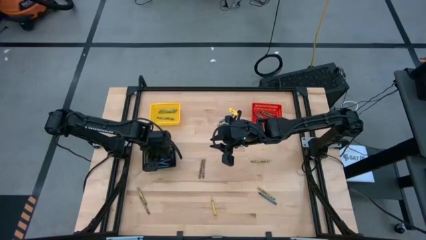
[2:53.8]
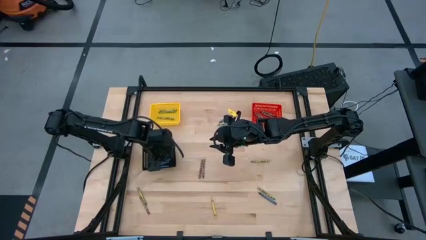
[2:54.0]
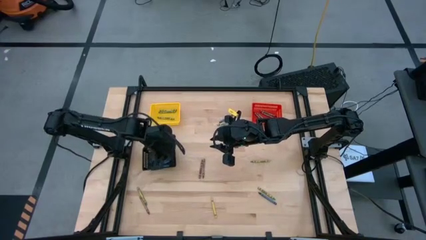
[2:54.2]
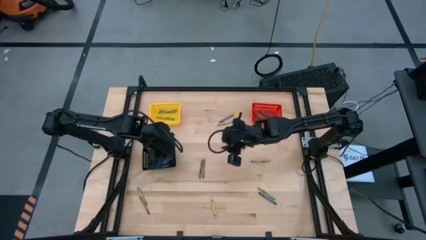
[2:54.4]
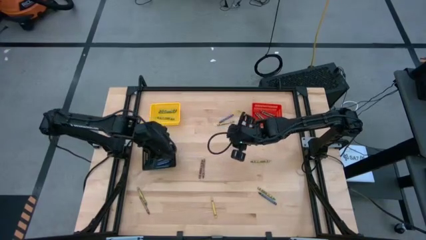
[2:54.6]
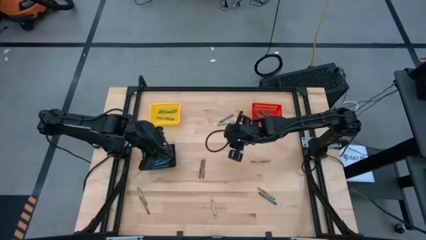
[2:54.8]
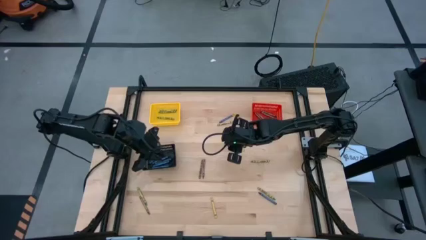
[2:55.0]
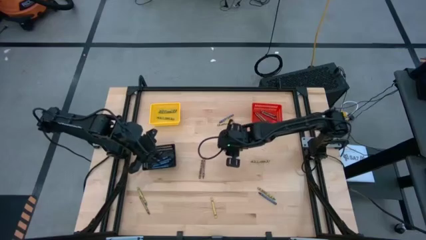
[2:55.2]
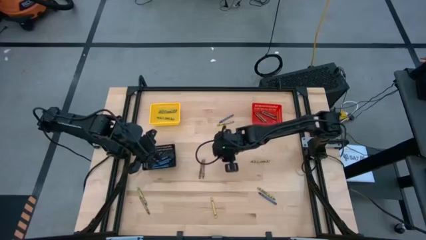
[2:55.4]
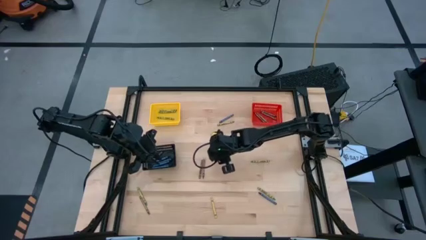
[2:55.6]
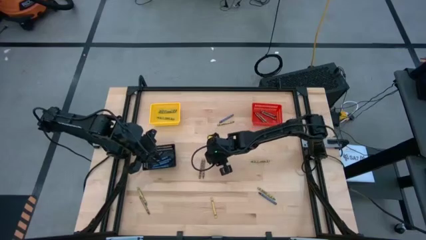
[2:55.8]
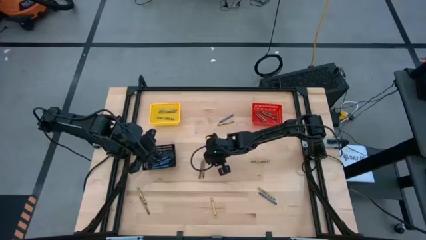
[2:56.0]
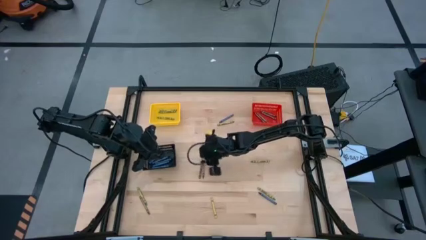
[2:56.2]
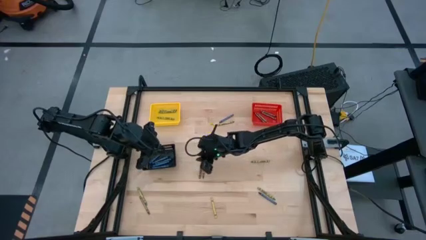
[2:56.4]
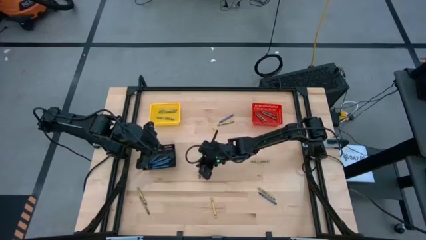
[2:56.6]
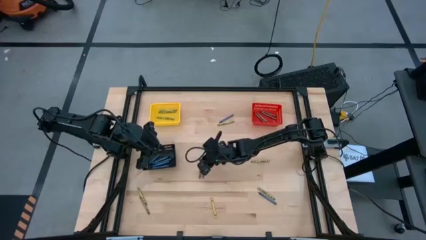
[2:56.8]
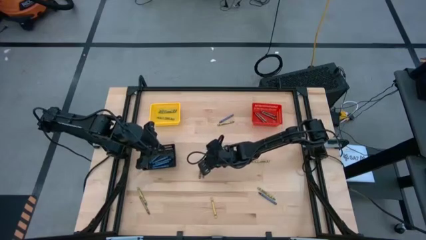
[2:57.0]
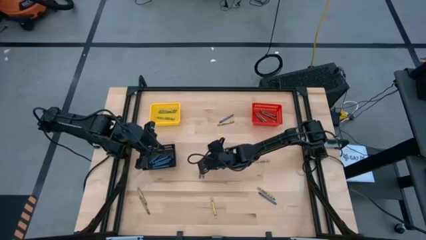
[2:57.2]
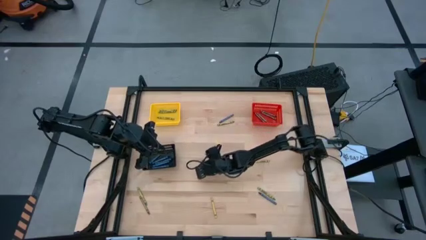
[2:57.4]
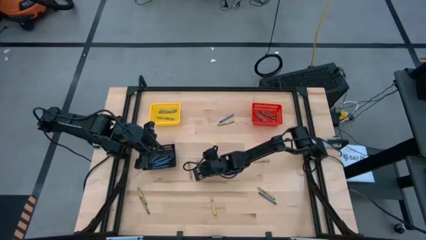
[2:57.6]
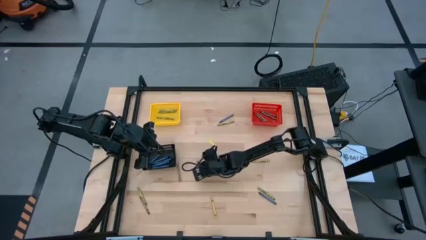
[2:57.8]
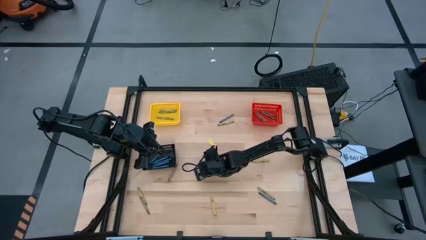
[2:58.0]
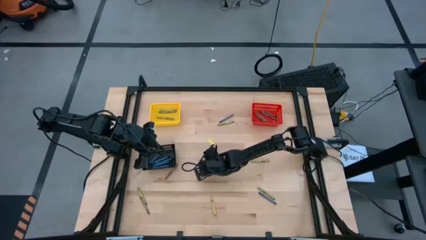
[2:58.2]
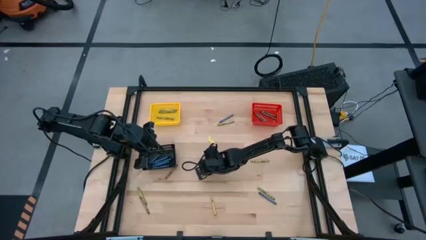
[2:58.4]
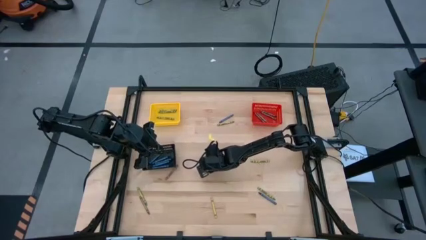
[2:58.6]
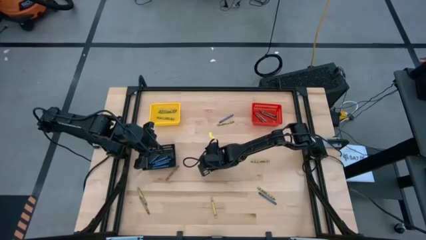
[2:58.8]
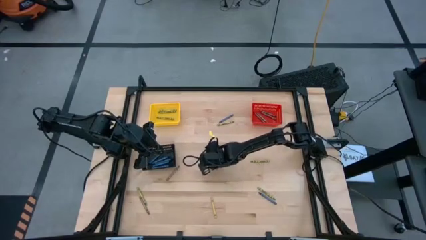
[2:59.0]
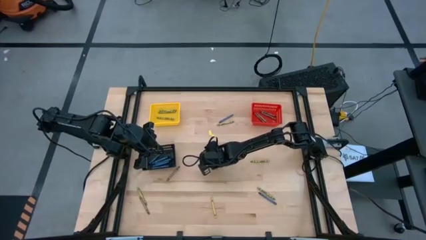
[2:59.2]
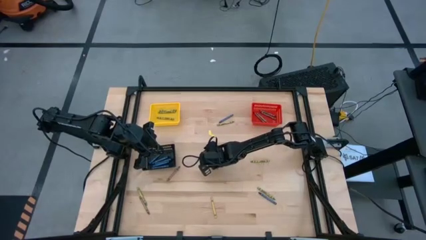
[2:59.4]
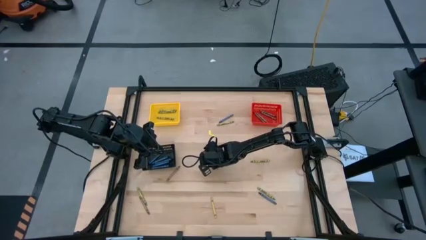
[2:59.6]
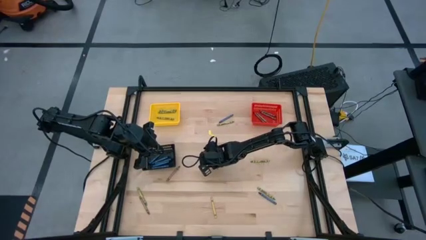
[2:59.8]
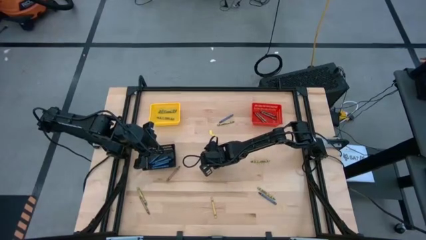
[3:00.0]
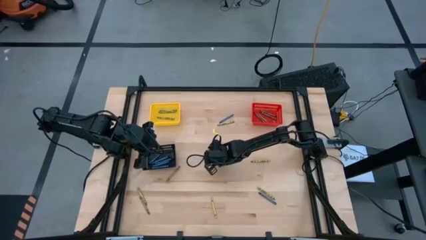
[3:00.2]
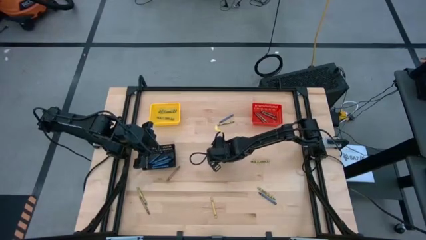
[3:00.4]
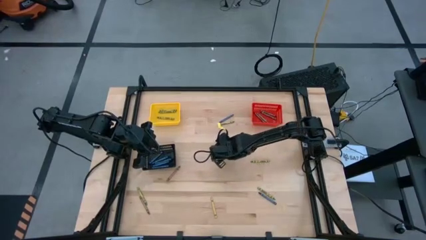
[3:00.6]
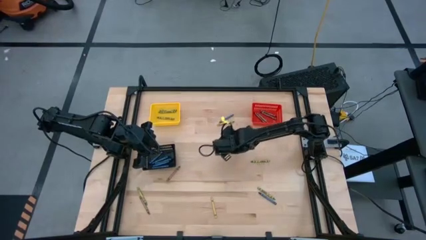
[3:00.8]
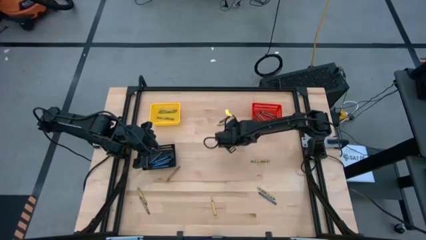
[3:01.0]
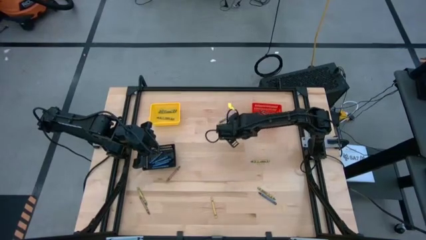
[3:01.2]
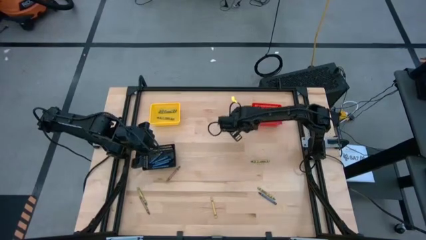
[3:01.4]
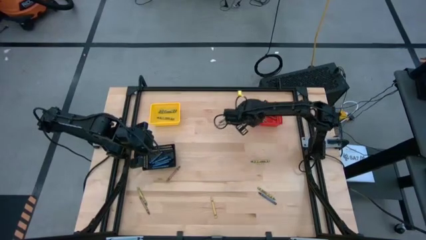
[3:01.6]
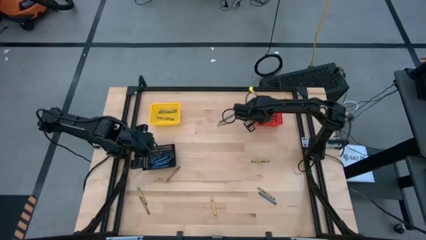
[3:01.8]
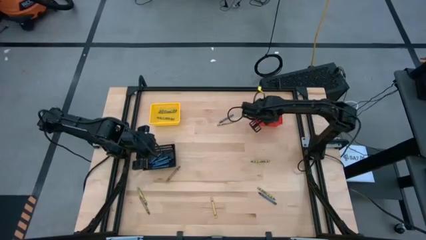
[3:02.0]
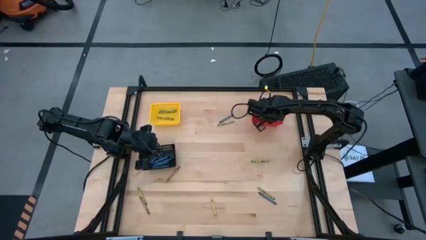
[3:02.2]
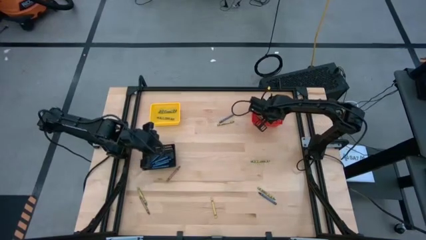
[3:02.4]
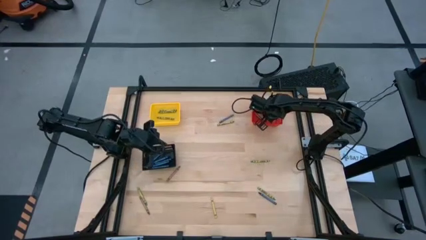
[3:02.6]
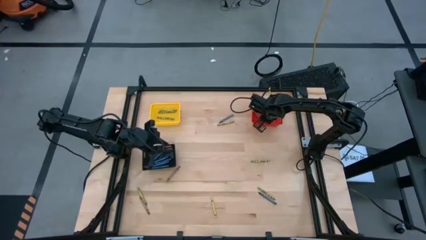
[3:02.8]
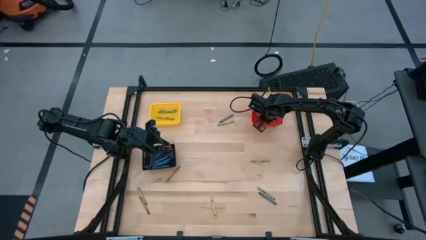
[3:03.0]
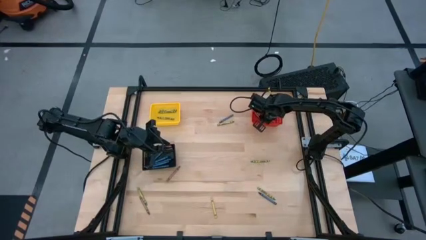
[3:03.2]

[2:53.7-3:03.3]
Task: Sort crayons
Put the brown crayon into the red bin

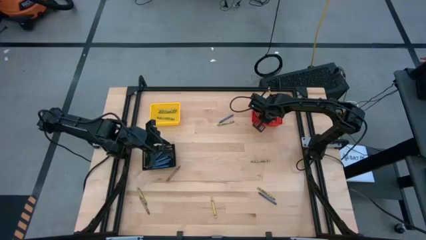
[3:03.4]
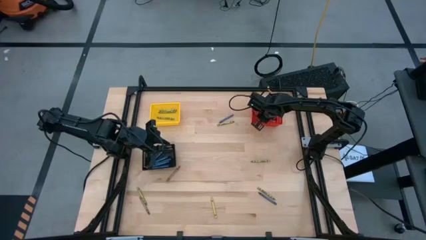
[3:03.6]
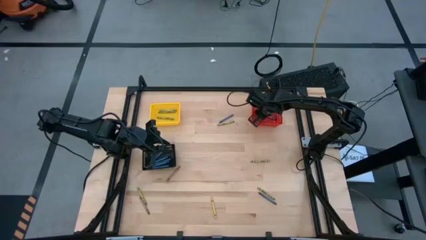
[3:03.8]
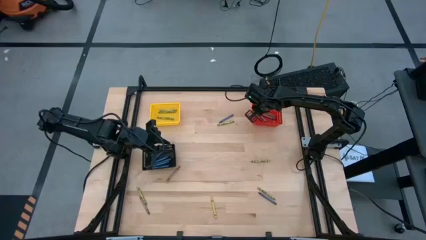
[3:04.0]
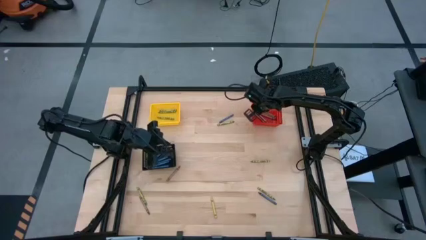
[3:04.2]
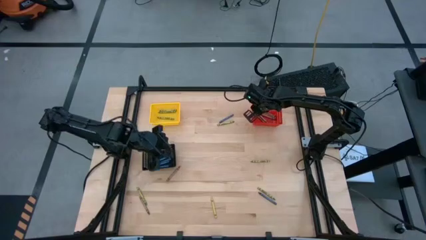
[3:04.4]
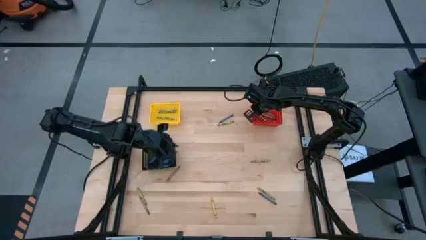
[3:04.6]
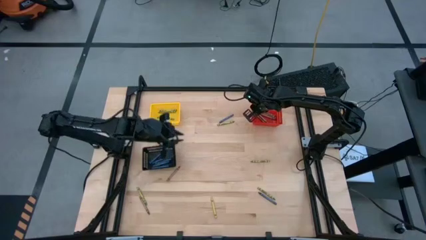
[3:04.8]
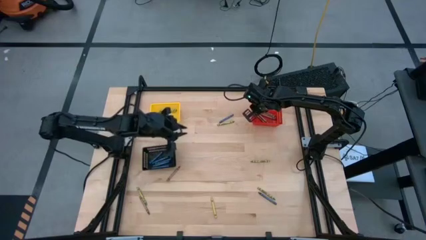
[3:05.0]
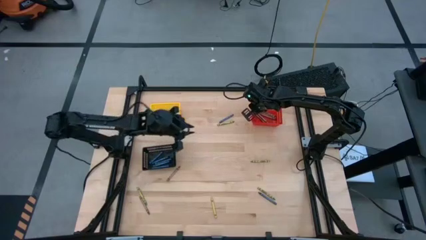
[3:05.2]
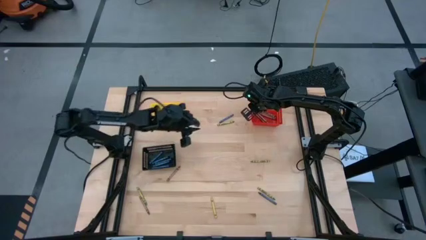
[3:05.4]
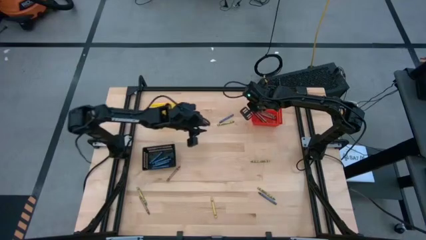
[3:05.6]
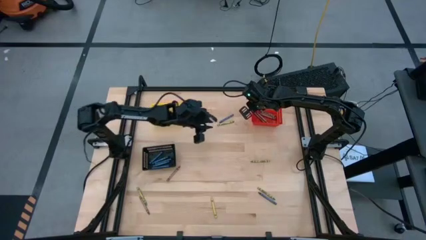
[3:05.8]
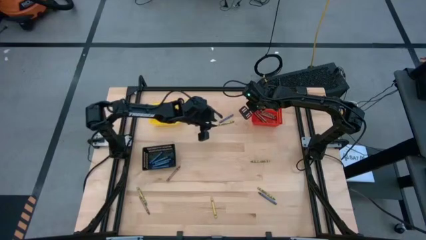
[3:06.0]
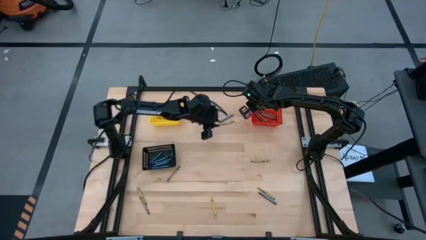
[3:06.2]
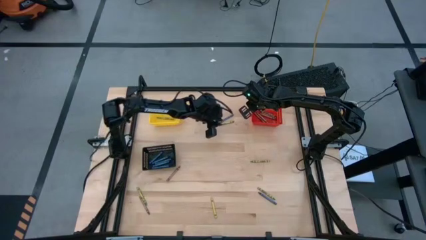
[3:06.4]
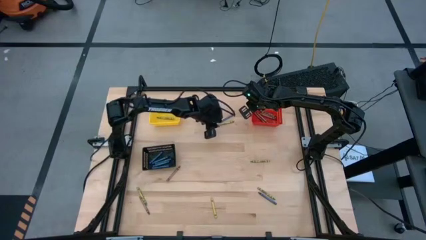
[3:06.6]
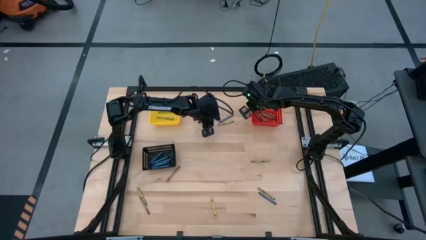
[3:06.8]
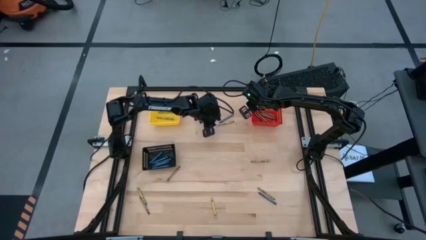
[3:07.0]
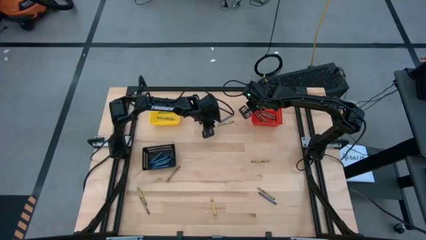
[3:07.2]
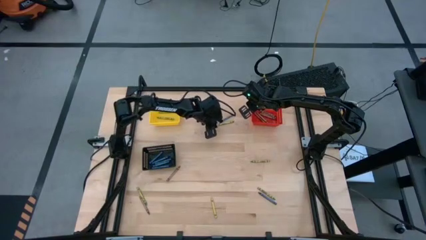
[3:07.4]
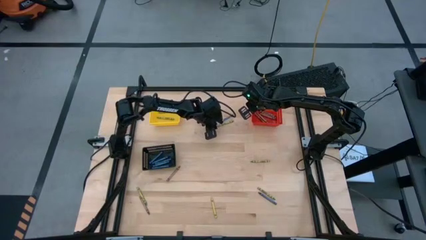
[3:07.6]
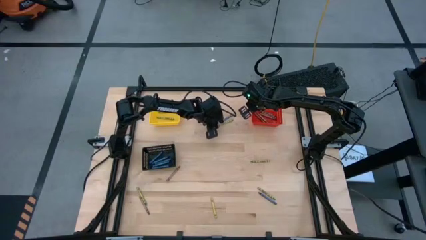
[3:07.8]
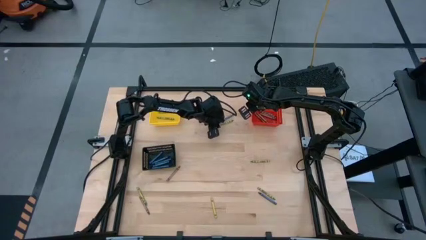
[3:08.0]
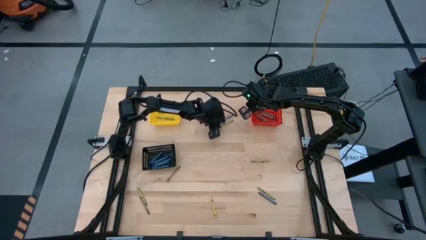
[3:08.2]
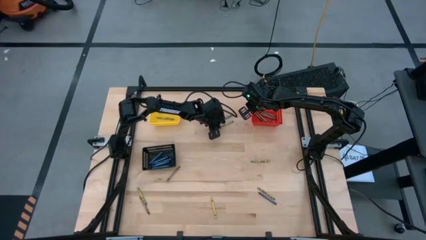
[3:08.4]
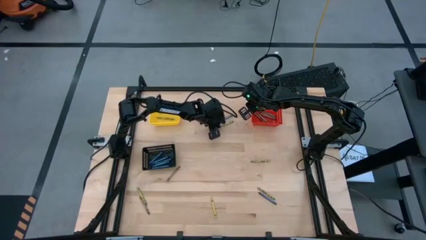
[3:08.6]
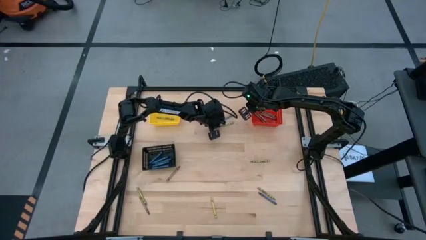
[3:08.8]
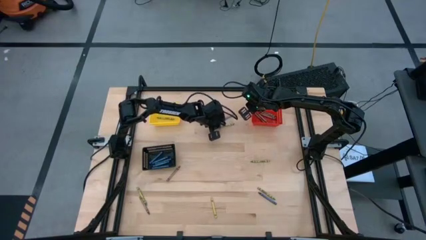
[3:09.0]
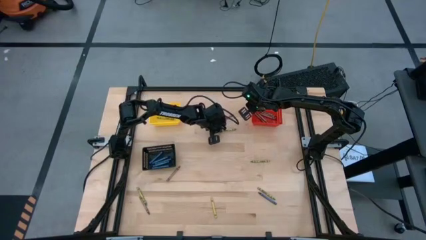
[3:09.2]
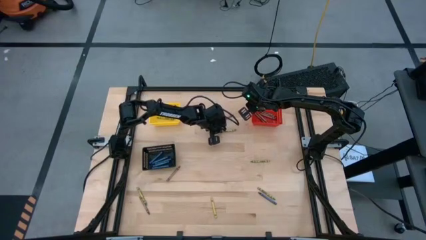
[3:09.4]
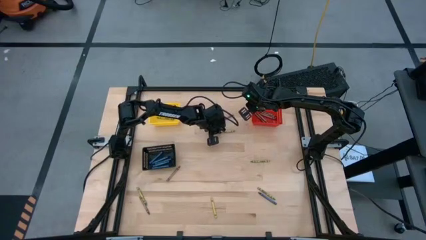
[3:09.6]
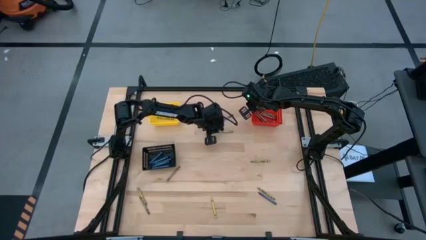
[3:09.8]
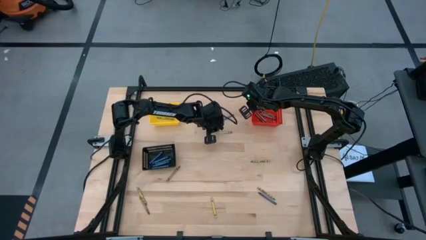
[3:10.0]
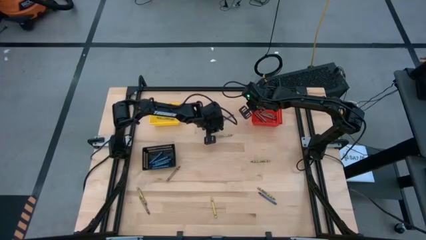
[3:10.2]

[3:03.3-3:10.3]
Put the green crayon into the yellow bin
